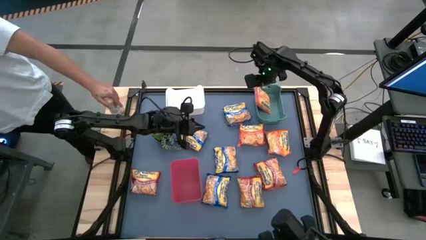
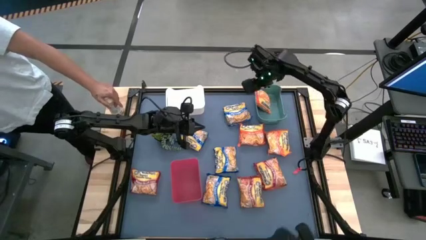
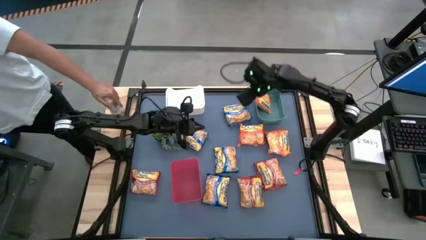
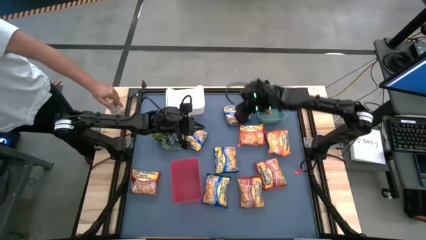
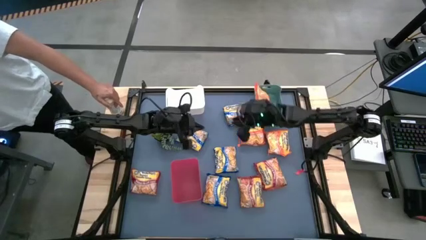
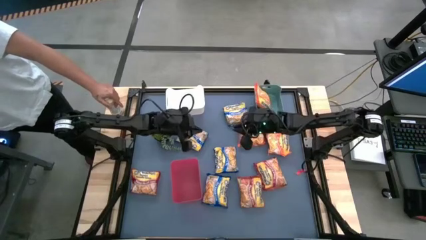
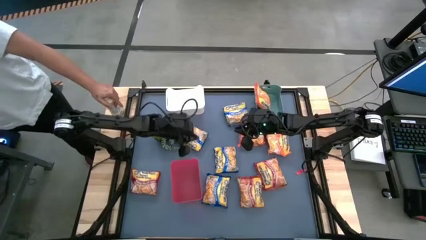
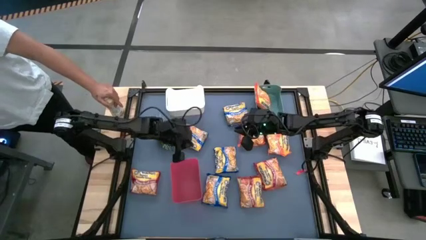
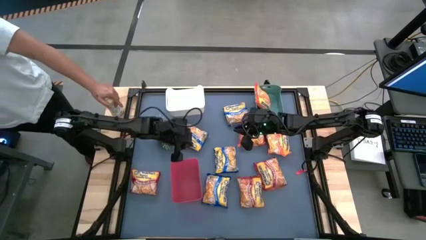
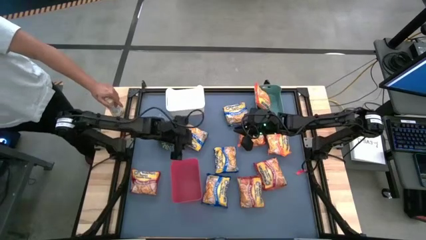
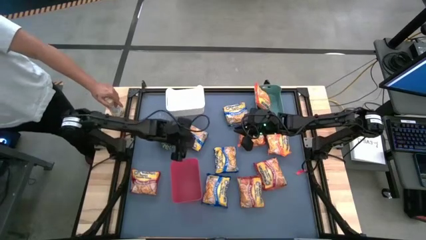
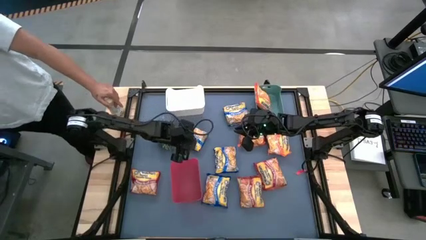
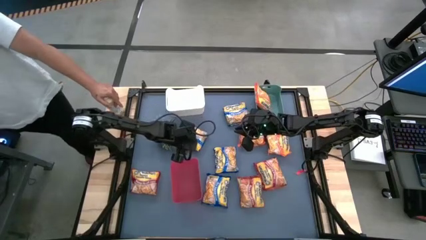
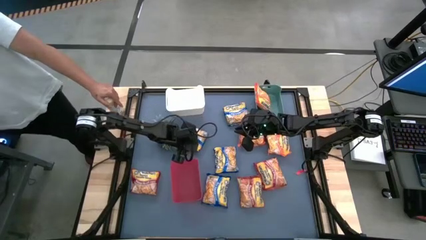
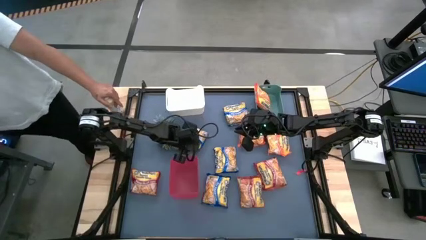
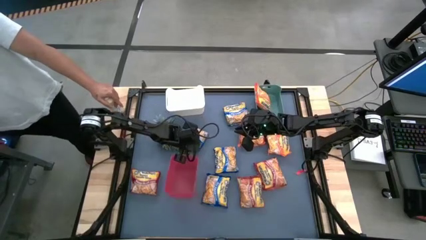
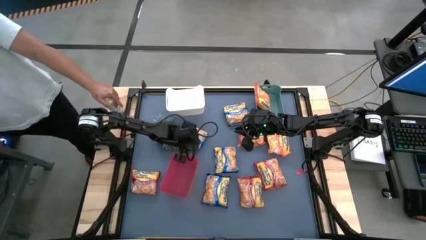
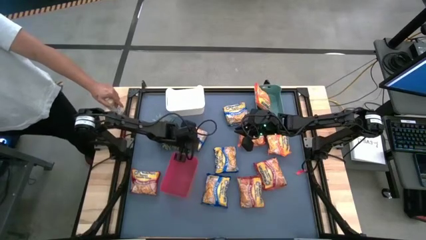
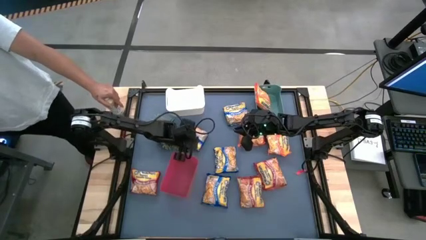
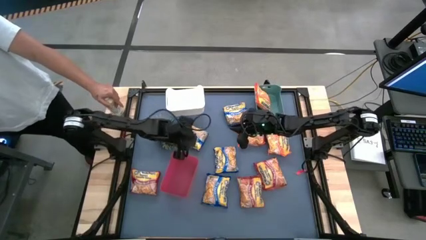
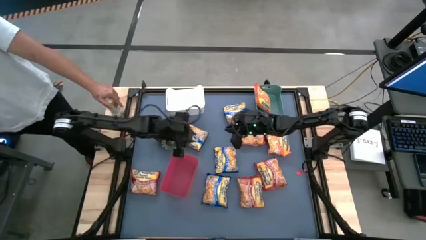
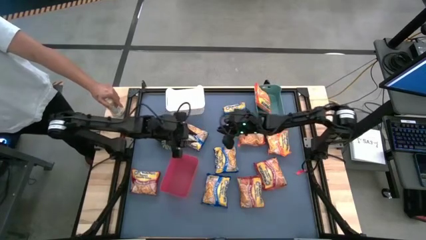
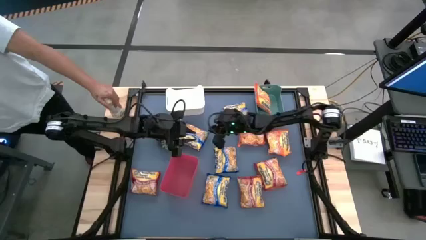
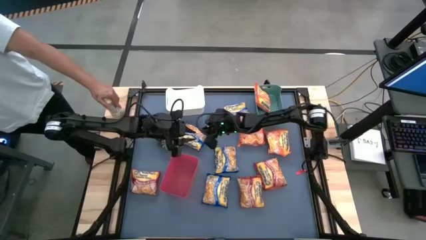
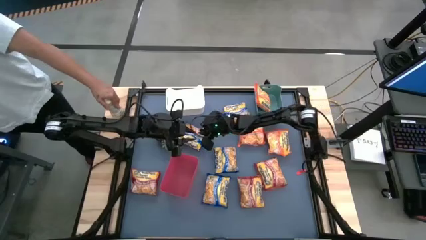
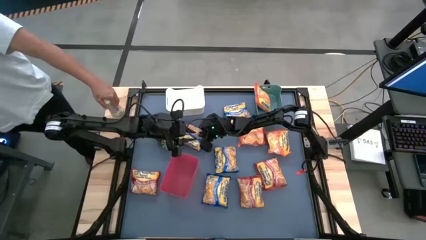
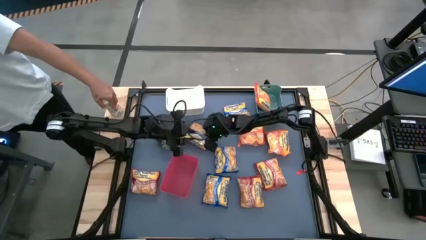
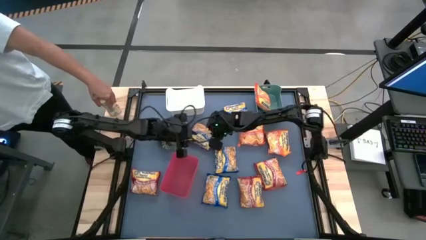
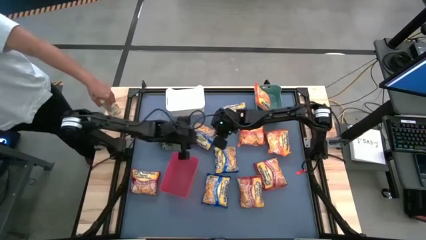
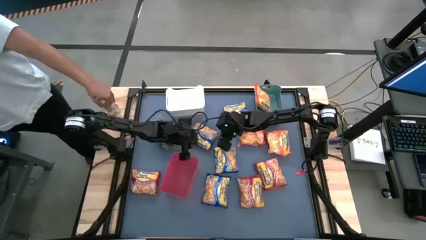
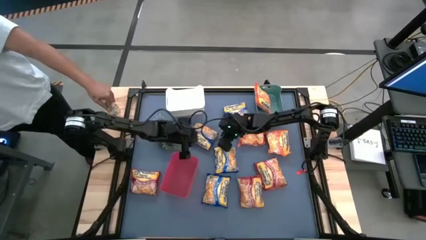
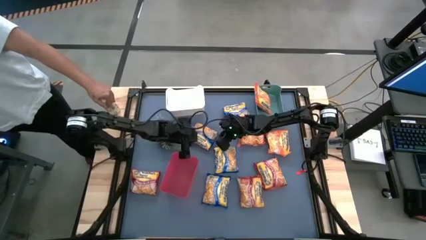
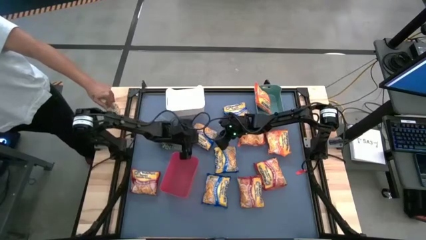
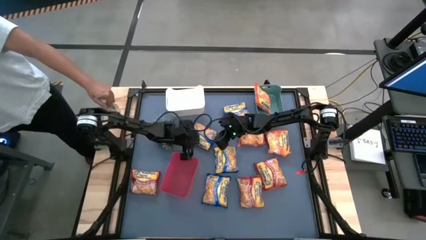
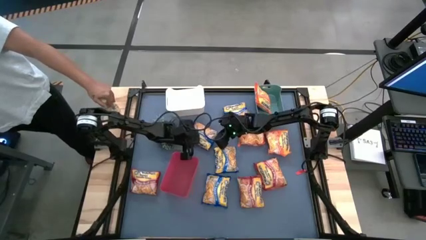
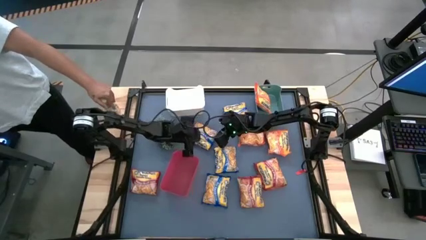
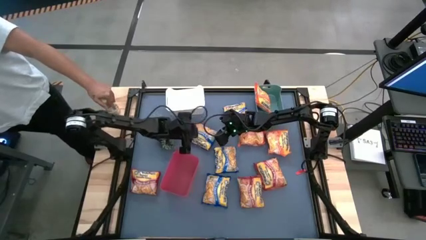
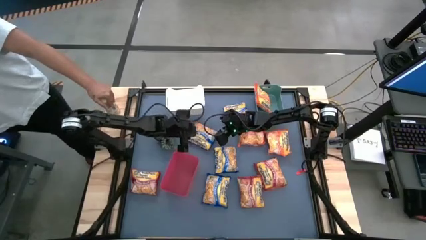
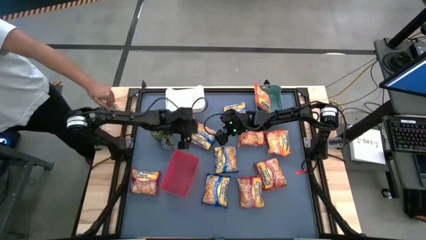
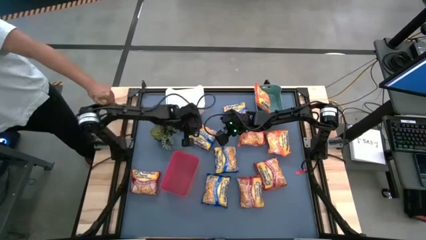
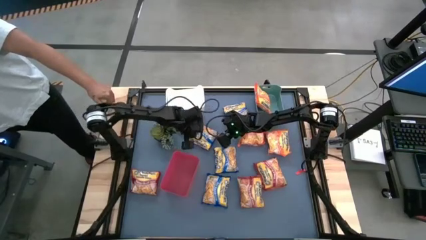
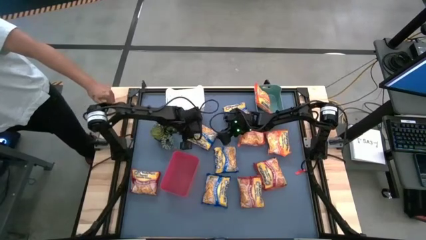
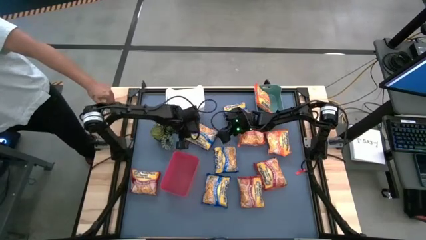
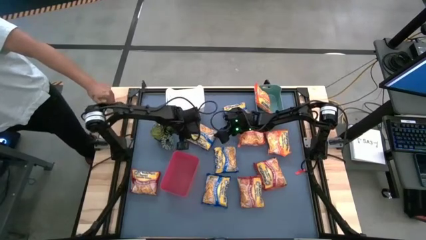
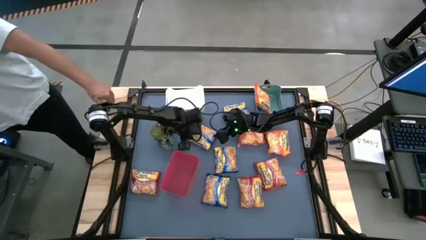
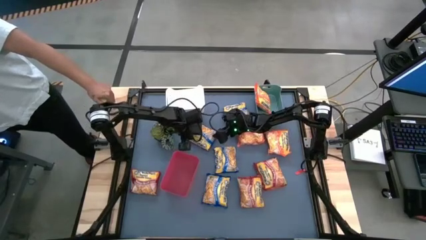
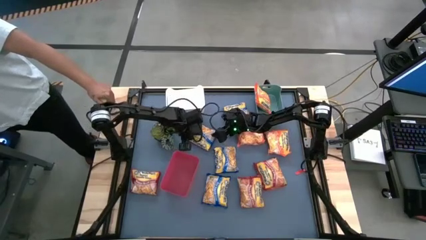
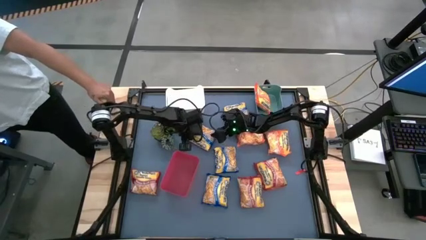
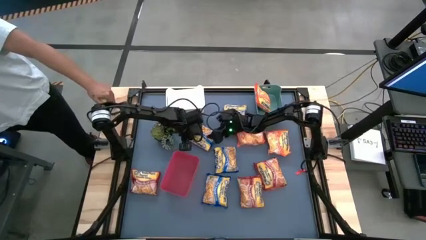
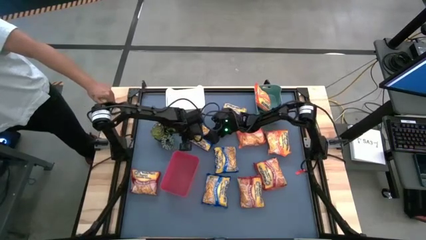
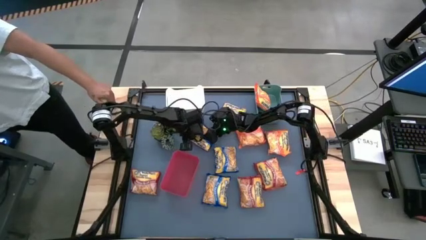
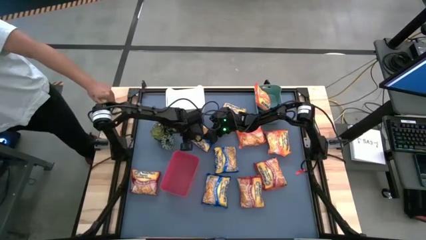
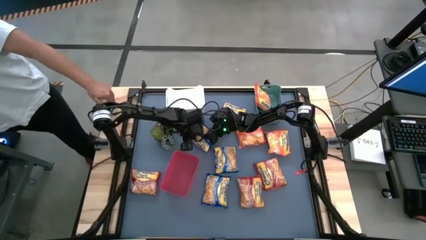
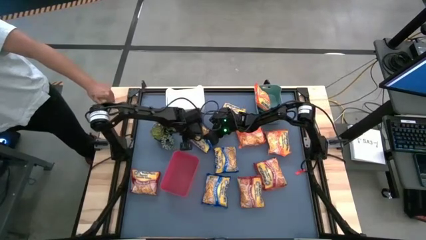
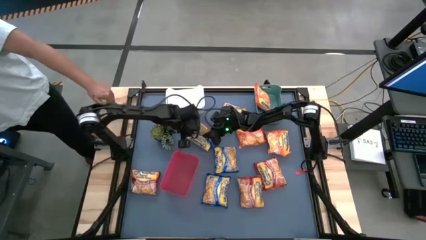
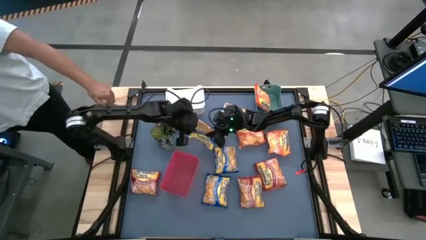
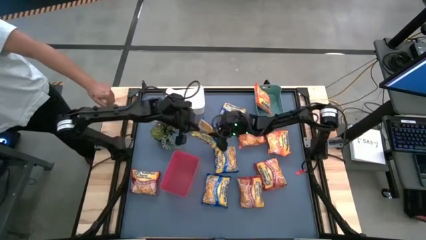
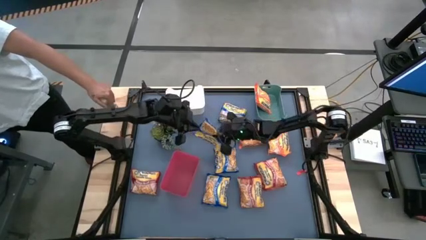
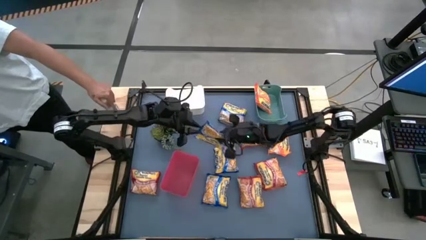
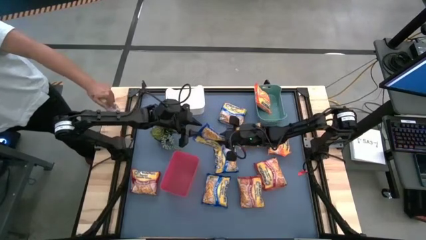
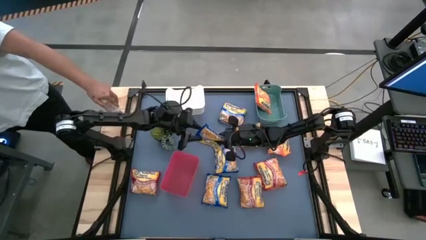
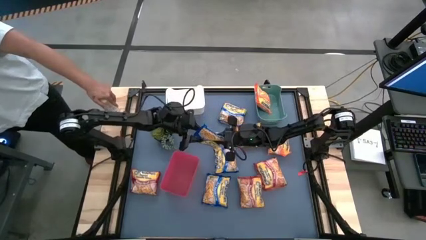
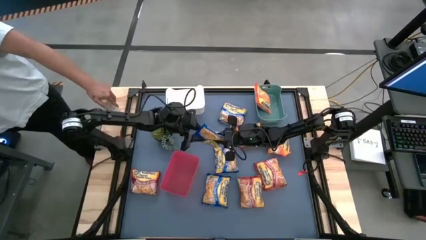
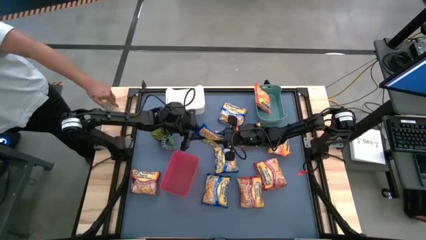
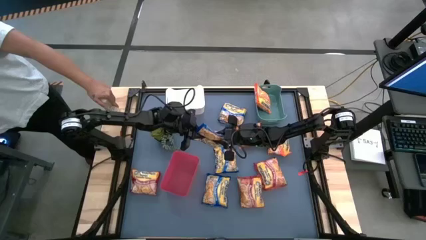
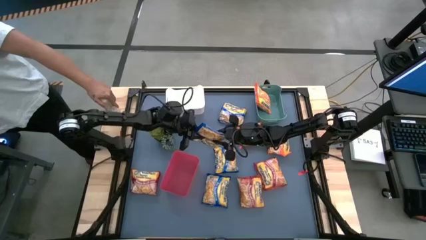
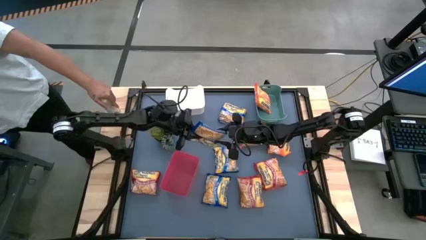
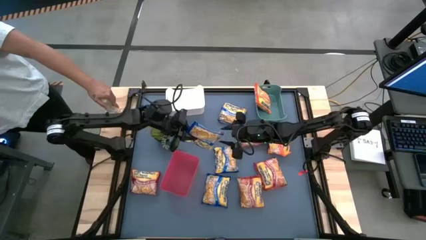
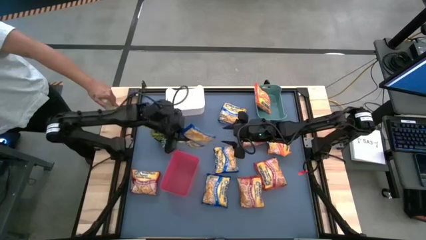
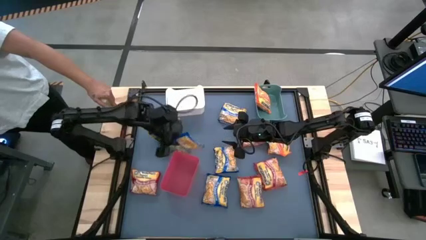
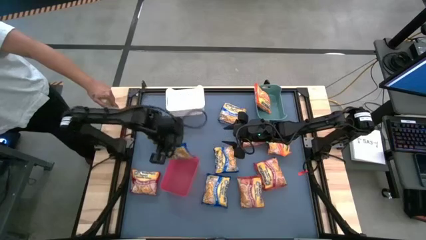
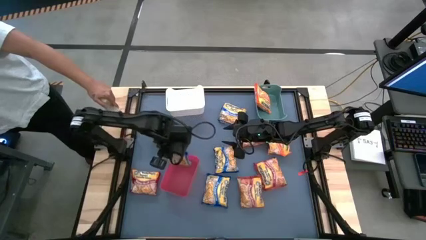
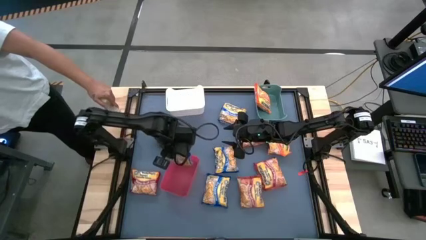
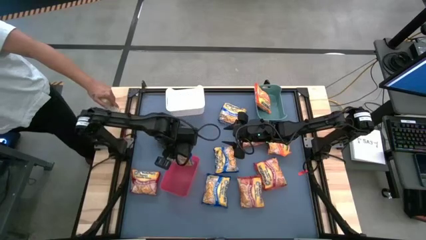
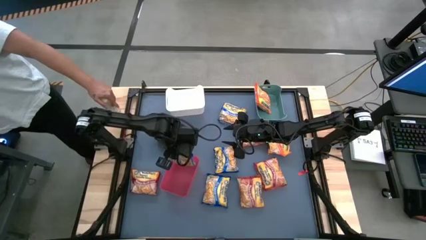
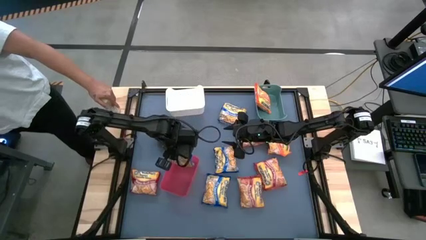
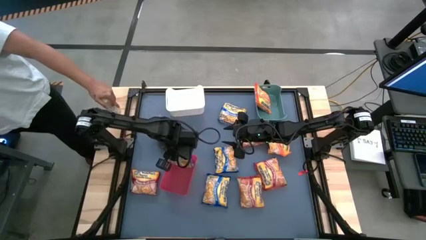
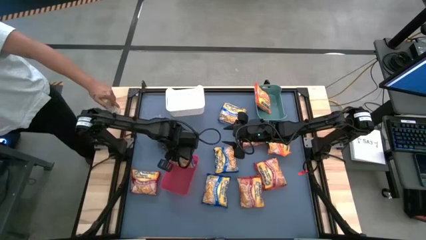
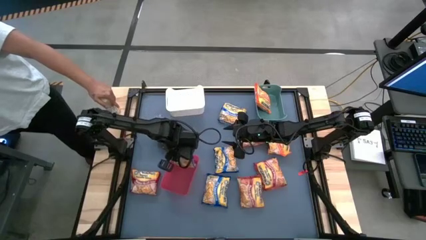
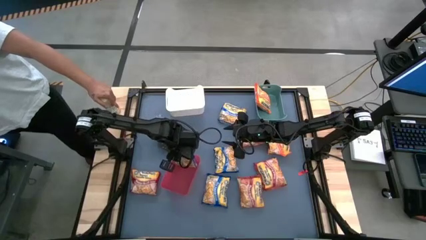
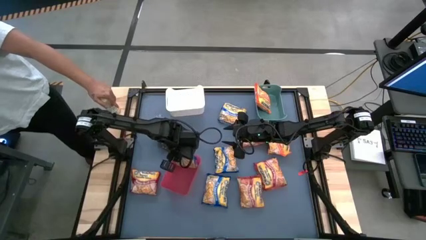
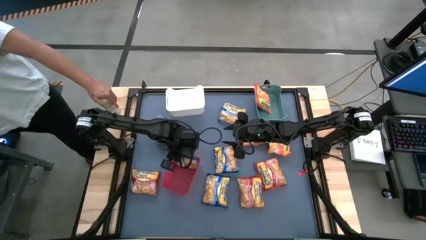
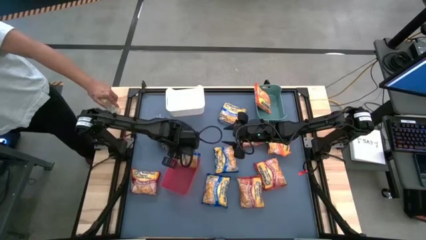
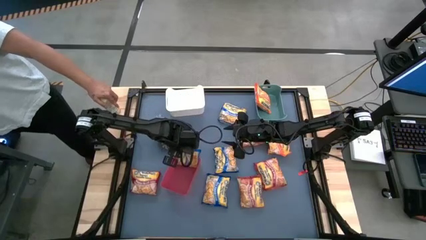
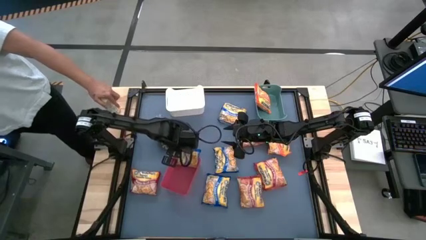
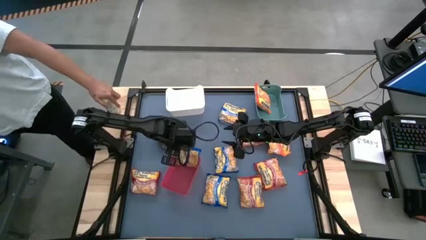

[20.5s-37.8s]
Task: Sort Maruchan noodles
Put the left blue noodle pack into the red bin
